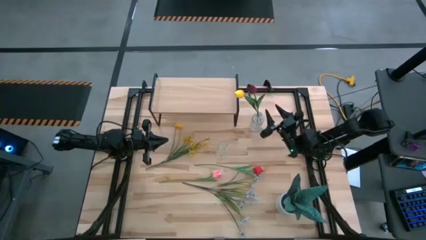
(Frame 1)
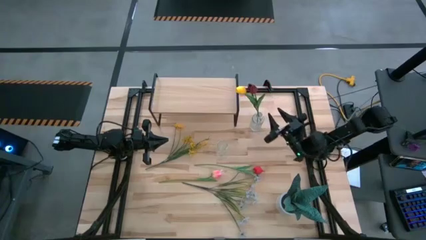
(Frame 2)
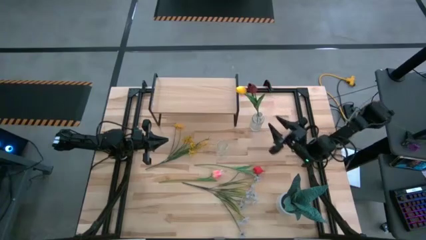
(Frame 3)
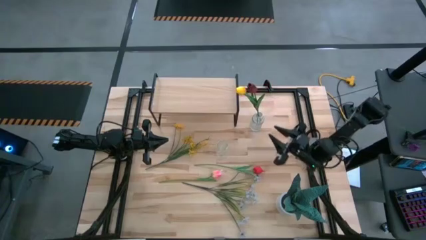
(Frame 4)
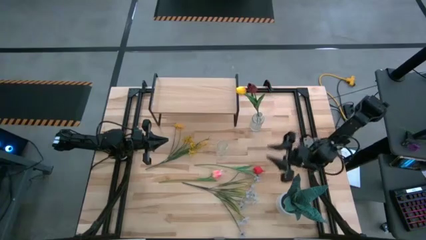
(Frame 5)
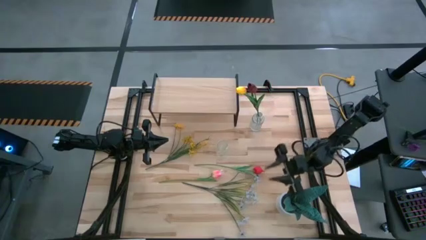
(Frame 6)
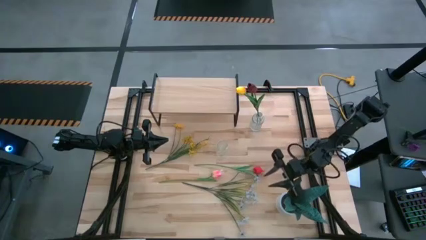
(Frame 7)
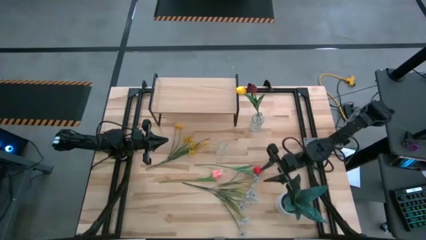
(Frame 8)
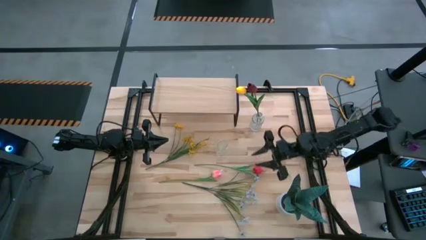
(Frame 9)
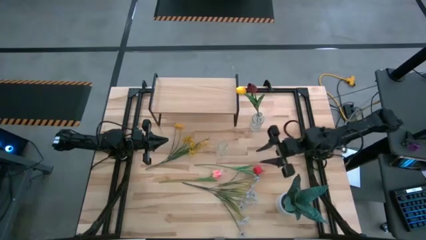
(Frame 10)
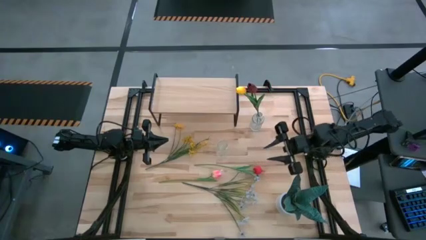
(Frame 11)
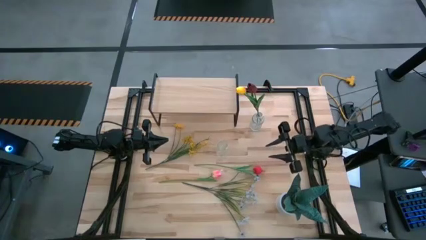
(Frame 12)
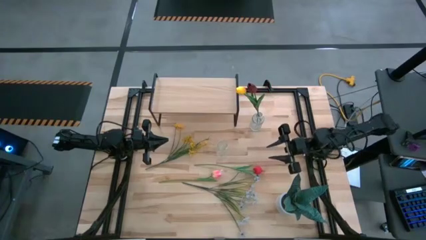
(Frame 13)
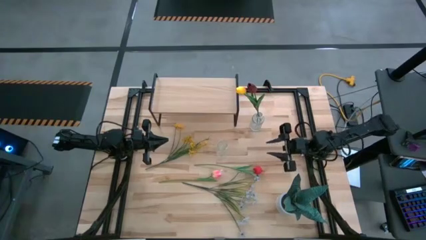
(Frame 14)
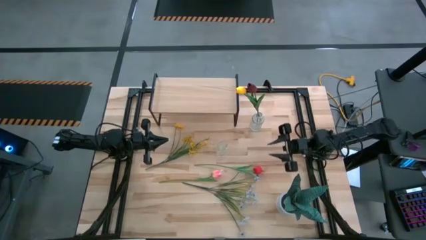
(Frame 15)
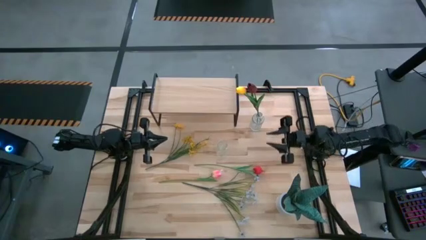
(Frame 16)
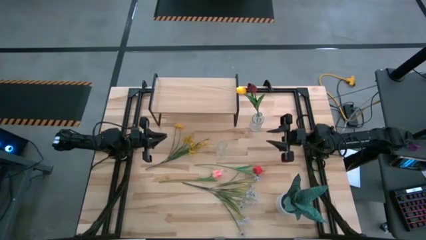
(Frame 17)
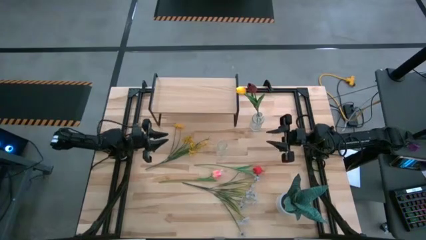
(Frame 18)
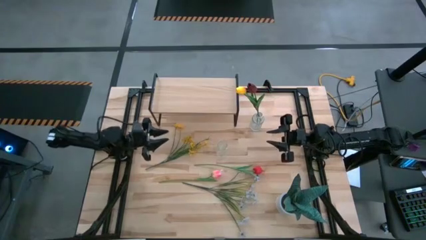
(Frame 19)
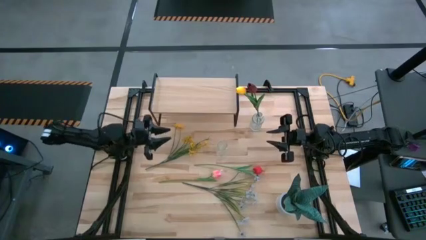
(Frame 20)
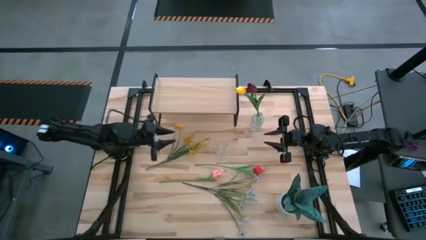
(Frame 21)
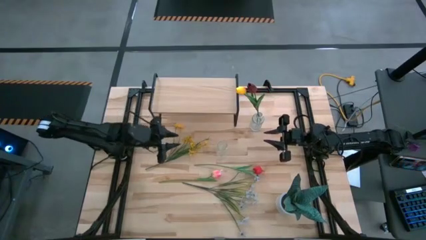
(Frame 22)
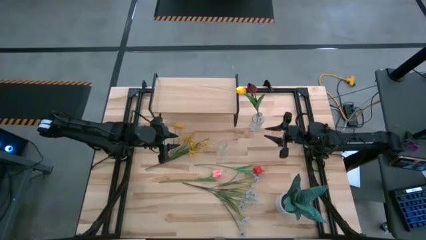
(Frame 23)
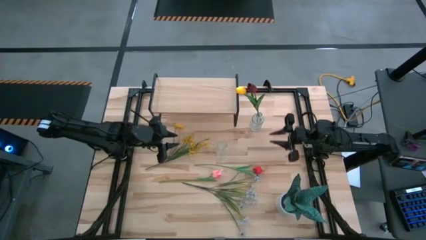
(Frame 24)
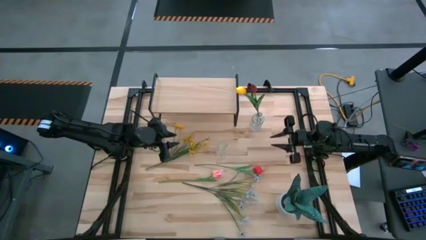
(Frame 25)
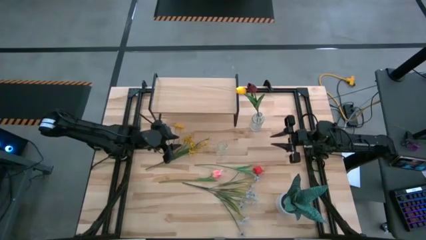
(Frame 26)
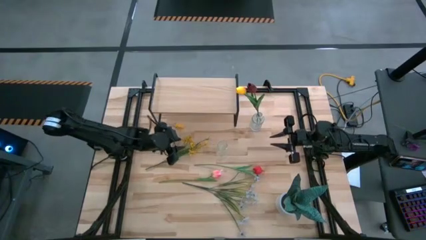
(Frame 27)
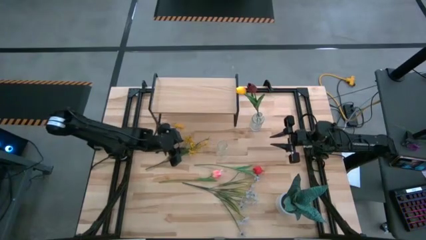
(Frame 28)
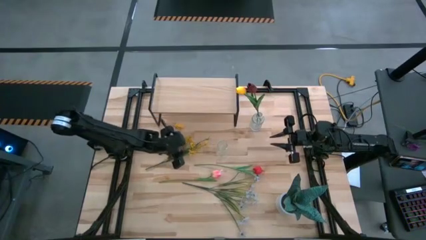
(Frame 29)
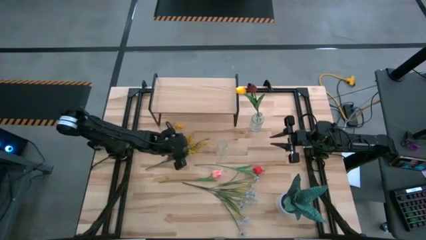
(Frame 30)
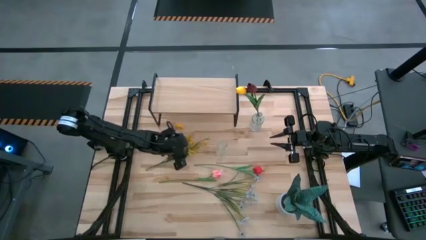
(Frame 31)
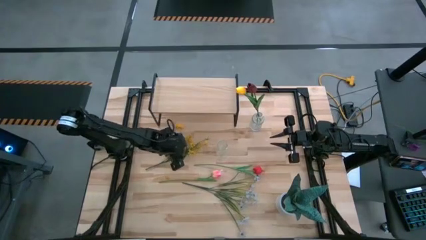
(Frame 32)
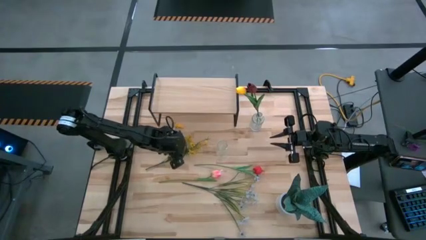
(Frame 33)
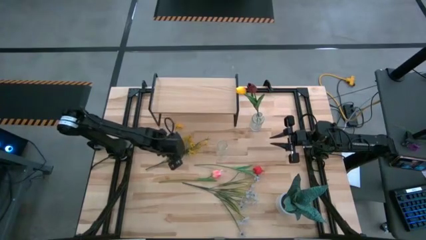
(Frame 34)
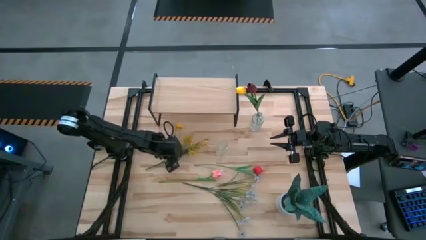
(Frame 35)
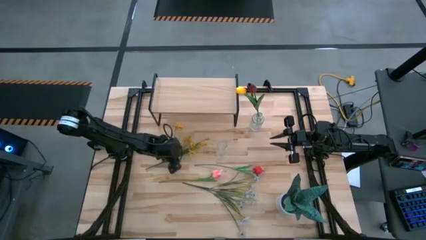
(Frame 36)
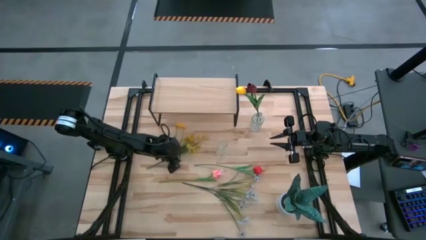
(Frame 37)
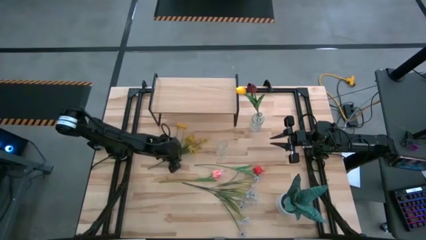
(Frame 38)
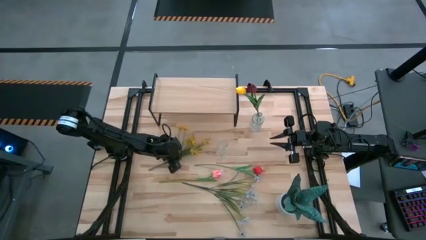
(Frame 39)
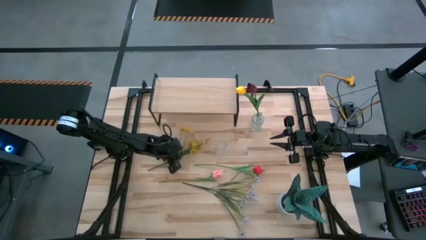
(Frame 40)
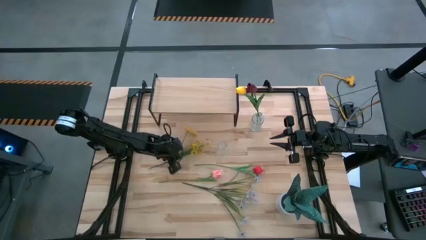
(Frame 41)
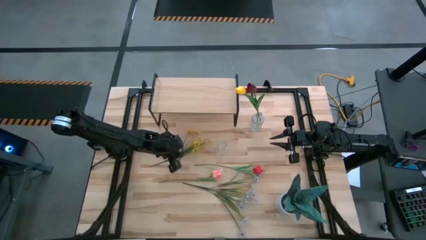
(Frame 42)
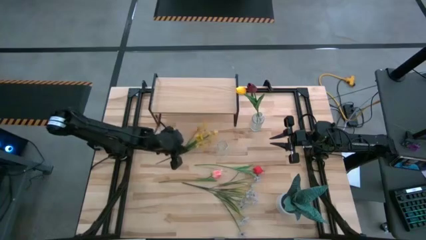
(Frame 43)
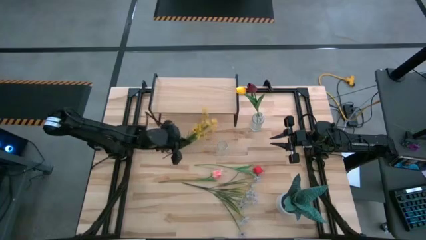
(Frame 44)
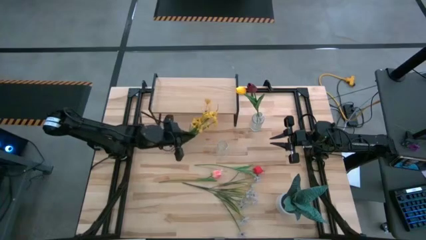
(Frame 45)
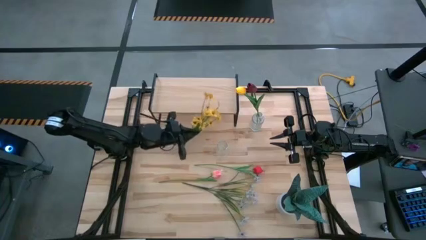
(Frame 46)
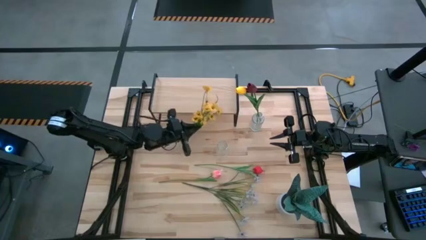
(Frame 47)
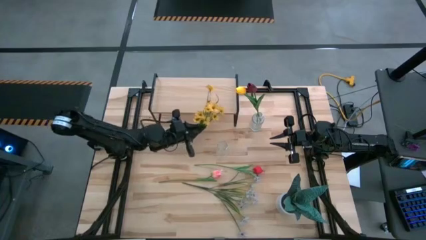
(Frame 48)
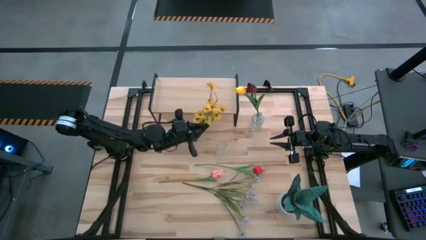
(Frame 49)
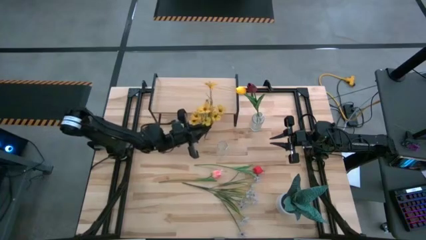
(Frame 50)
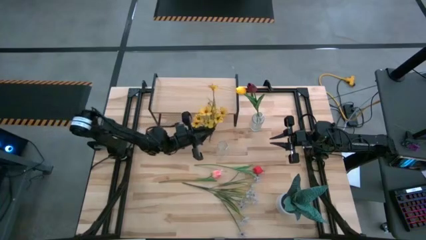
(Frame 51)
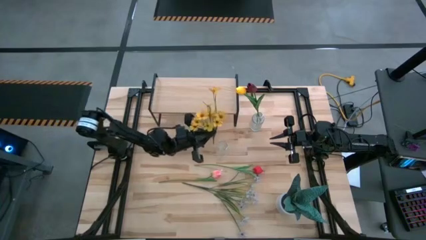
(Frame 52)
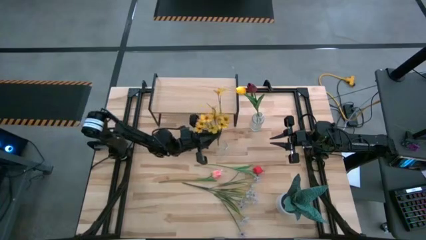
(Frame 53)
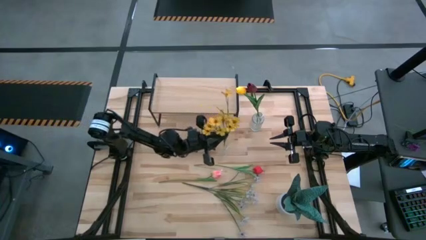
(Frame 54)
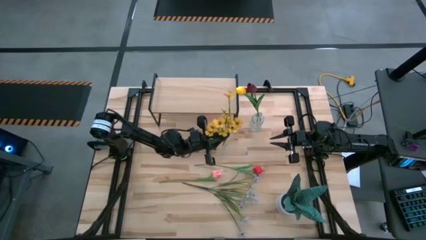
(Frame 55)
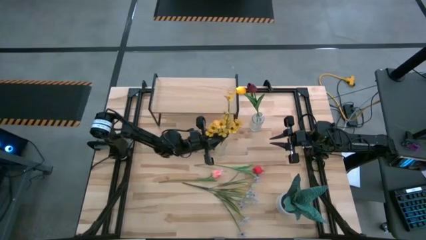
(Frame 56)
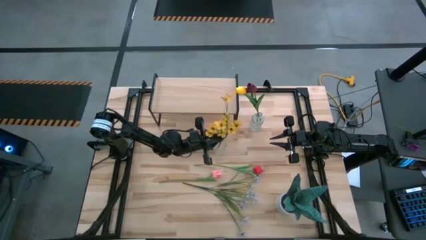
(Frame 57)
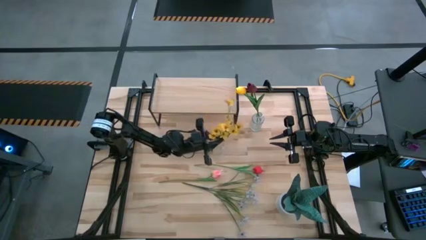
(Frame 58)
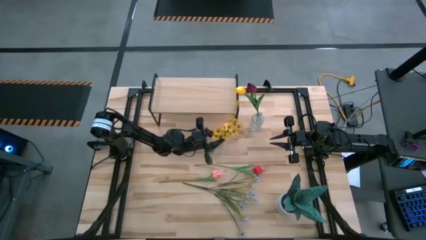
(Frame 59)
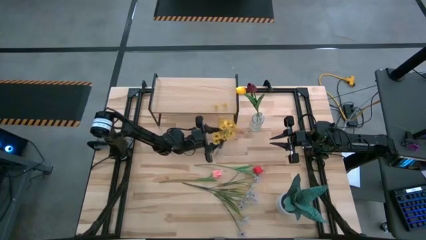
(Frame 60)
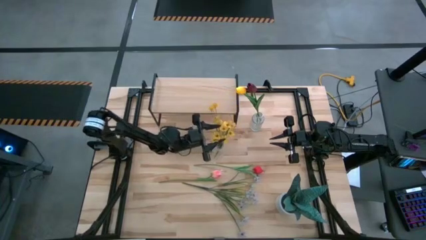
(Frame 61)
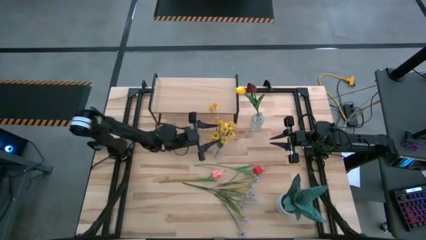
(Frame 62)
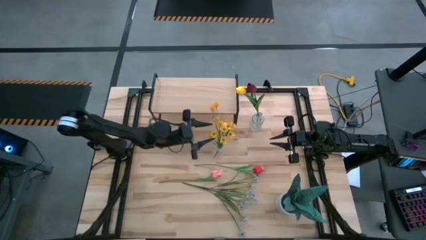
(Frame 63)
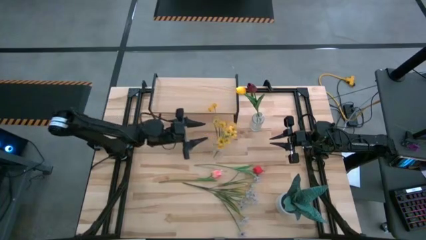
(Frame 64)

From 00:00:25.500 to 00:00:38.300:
Task: Pick and place flowers into a vace then onto a shelf
Put the yellow flowers into the bottom transparent vase
